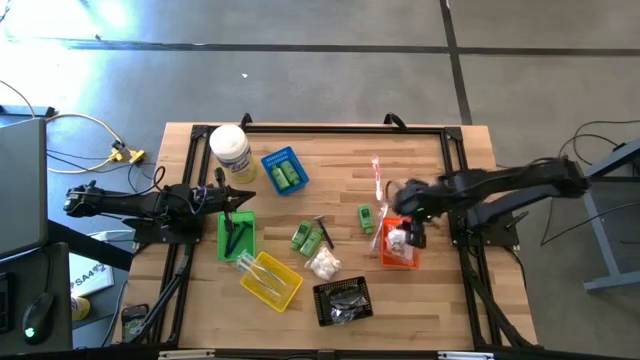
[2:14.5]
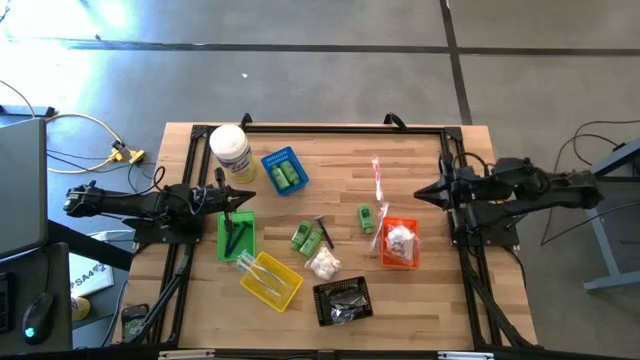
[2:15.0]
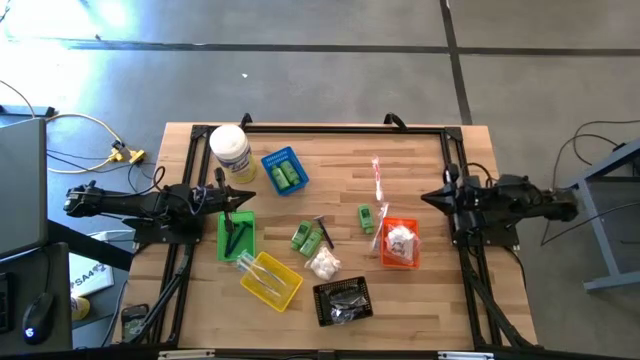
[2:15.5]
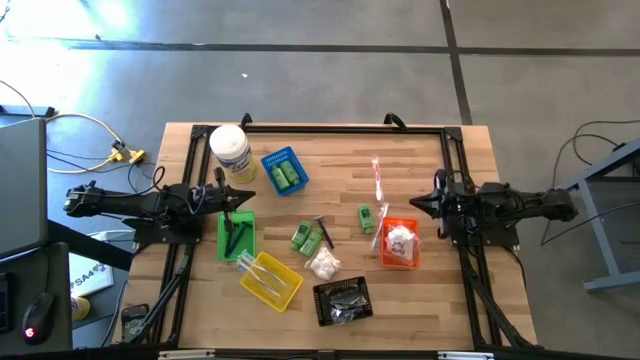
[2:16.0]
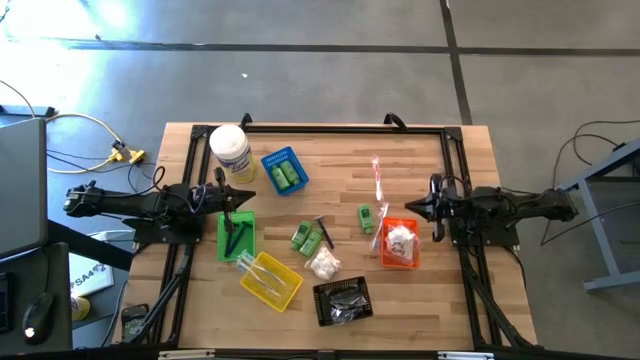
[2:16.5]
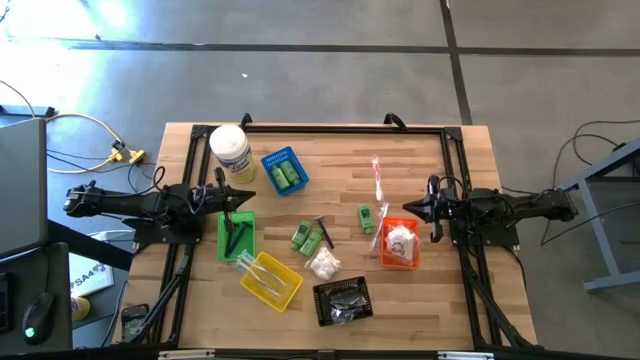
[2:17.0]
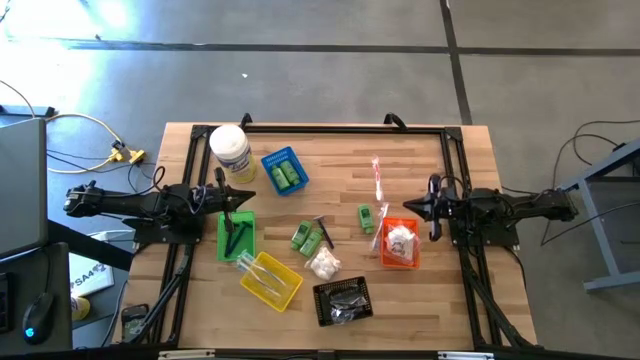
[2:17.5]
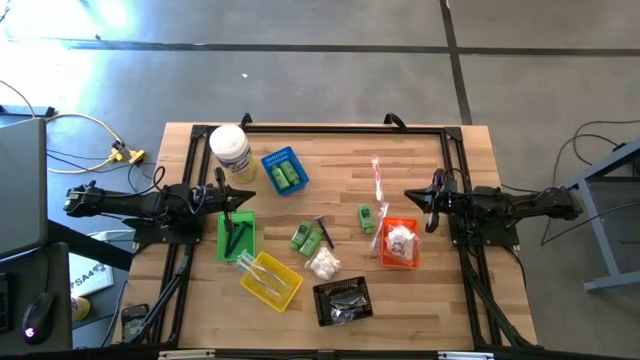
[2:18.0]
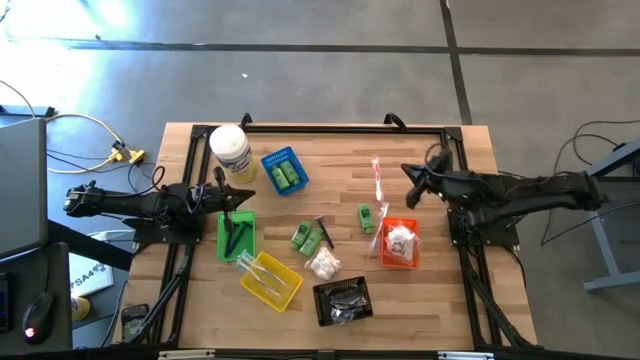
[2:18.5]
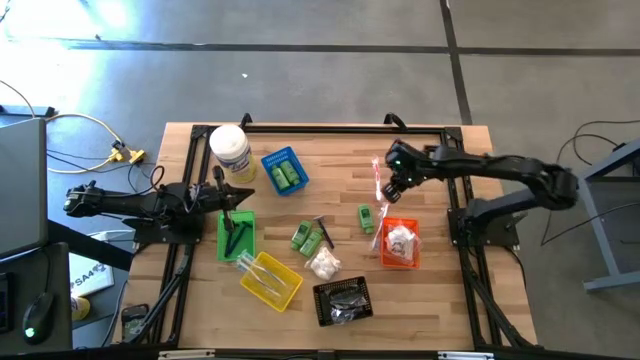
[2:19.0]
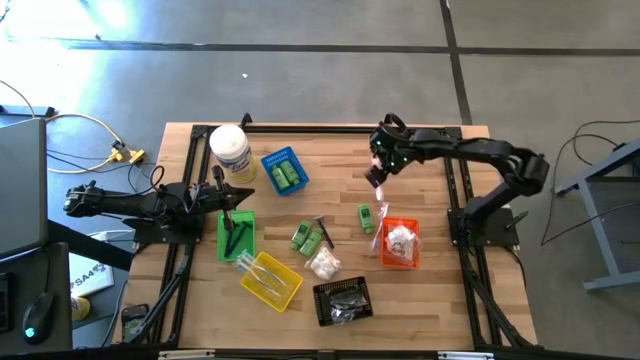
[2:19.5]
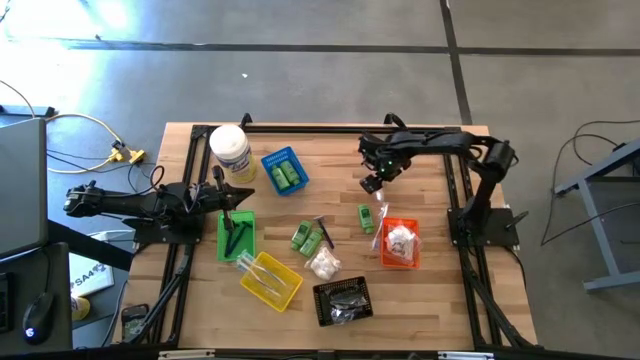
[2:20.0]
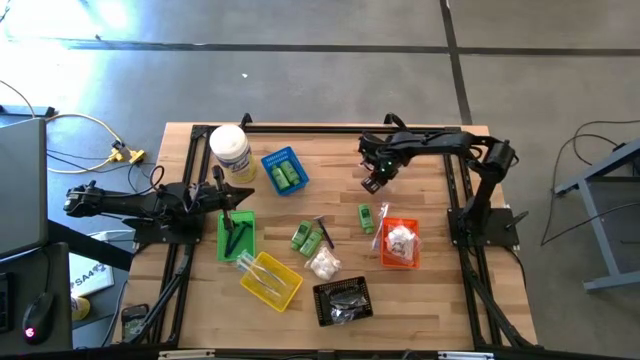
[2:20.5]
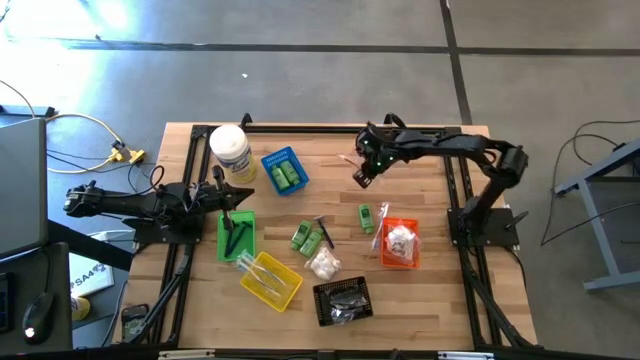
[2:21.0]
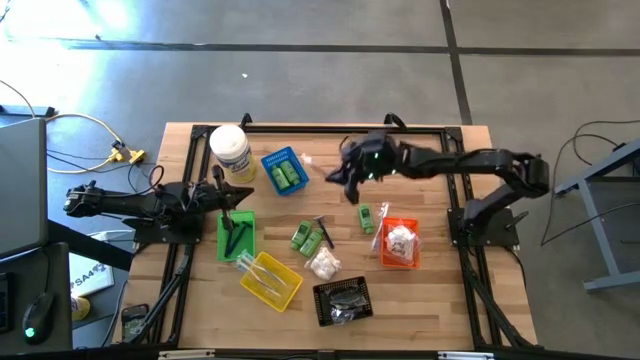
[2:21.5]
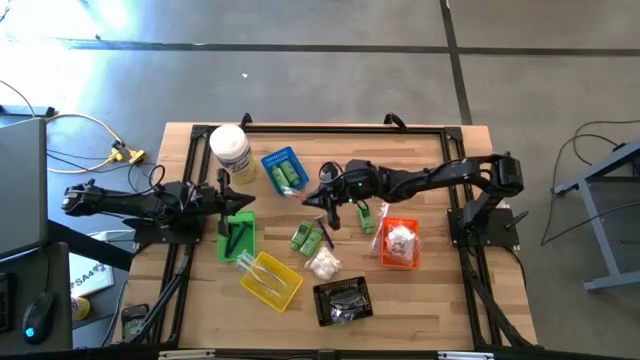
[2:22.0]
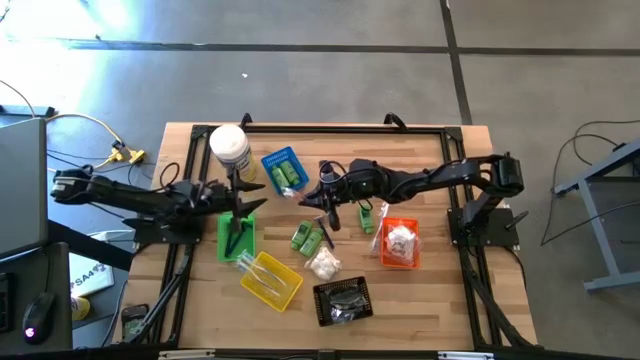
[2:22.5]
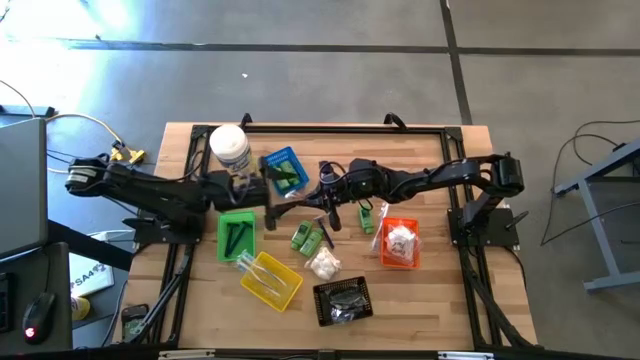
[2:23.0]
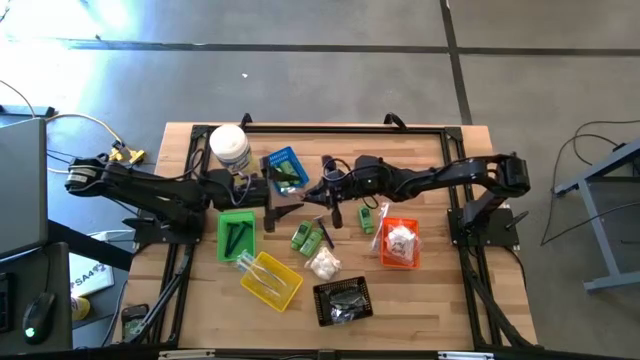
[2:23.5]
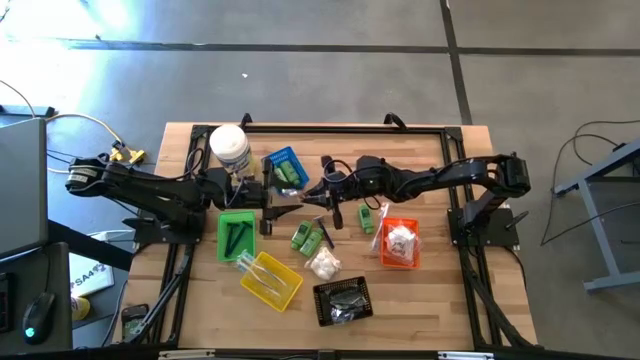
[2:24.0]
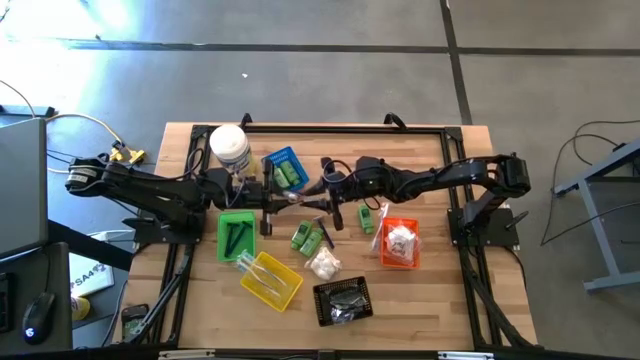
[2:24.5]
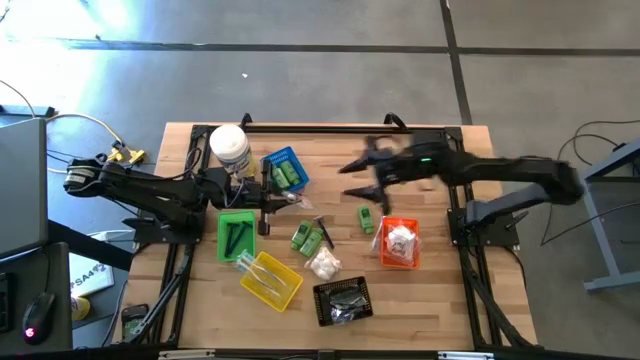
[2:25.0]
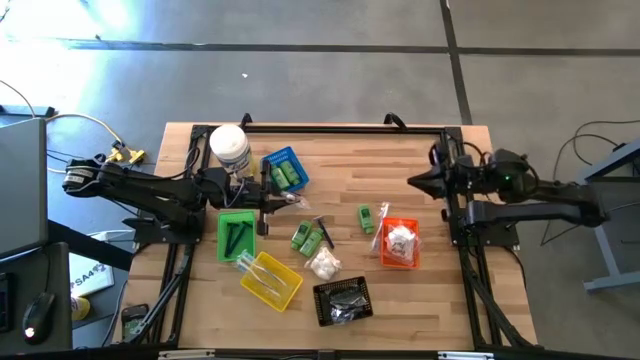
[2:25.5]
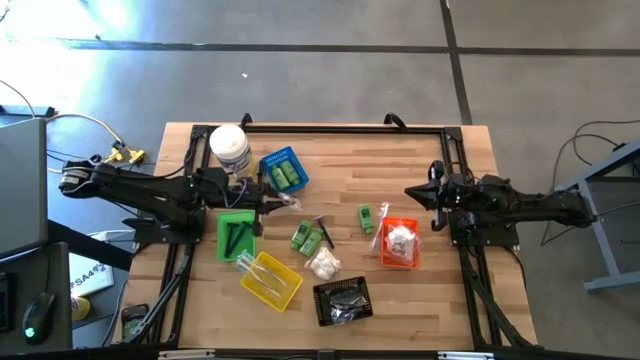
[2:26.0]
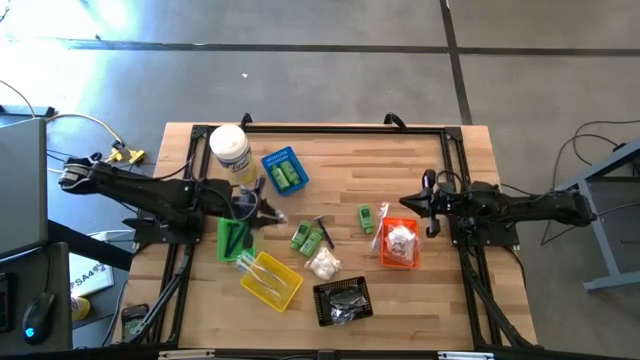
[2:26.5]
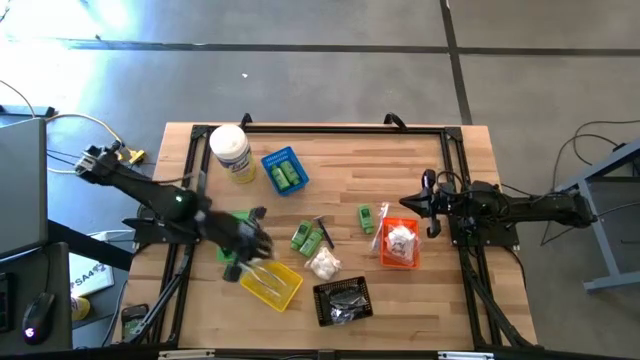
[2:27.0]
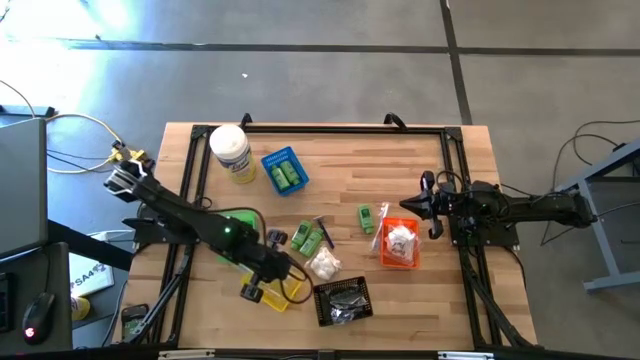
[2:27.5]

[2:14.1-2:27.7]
Task: Pick & Place Travel size toiletries
Put the orange toothbrush into the yellow bin

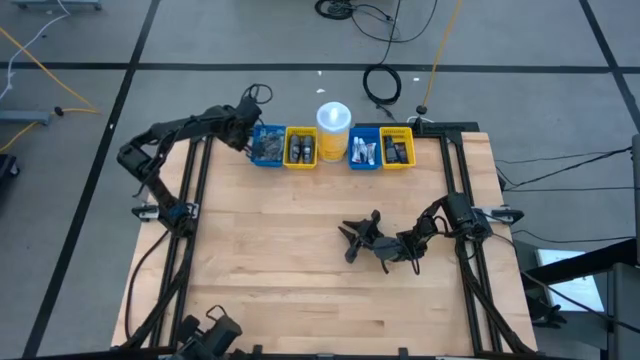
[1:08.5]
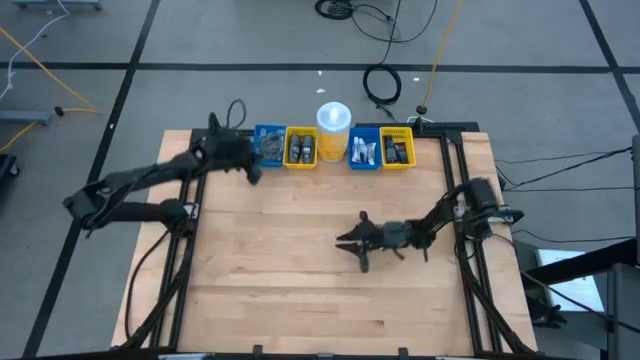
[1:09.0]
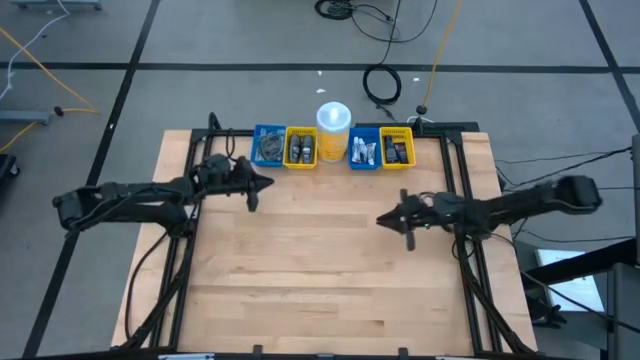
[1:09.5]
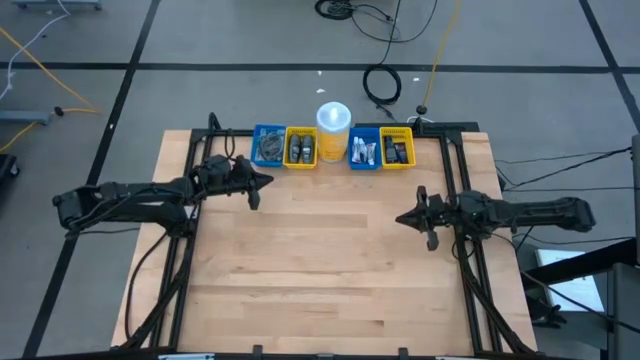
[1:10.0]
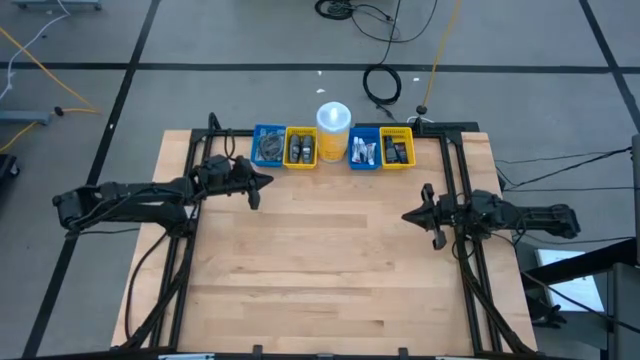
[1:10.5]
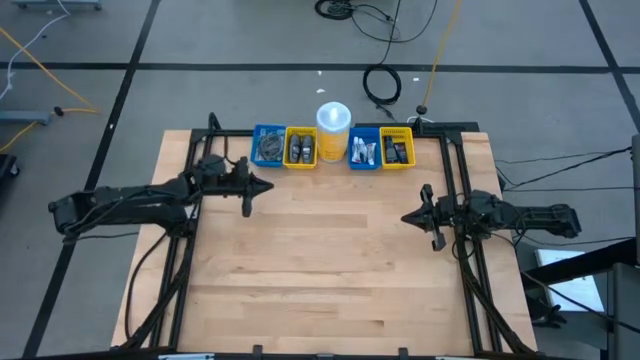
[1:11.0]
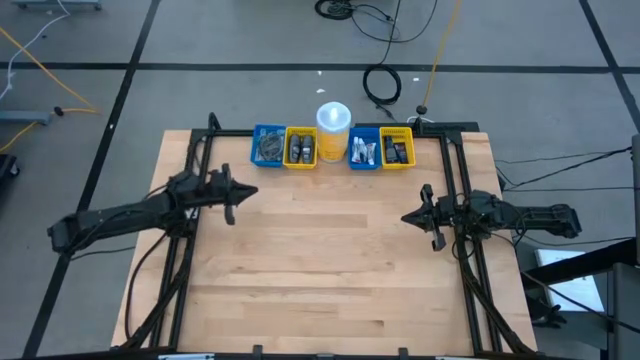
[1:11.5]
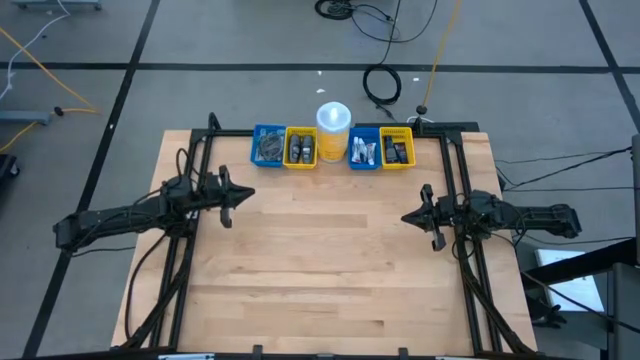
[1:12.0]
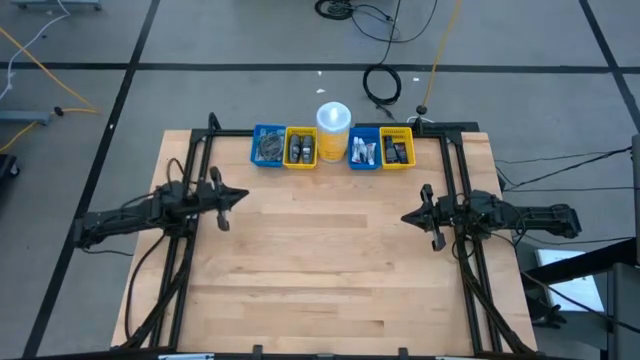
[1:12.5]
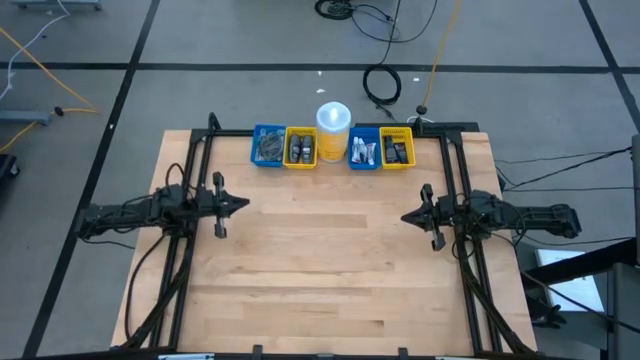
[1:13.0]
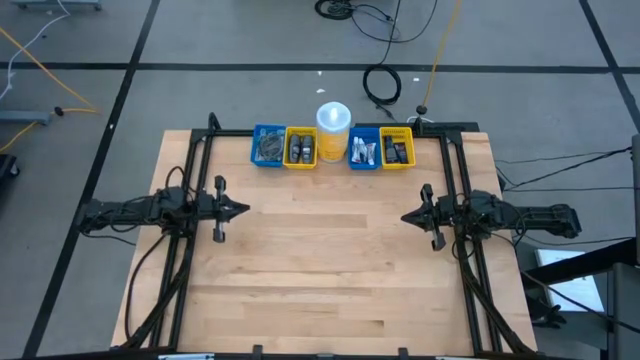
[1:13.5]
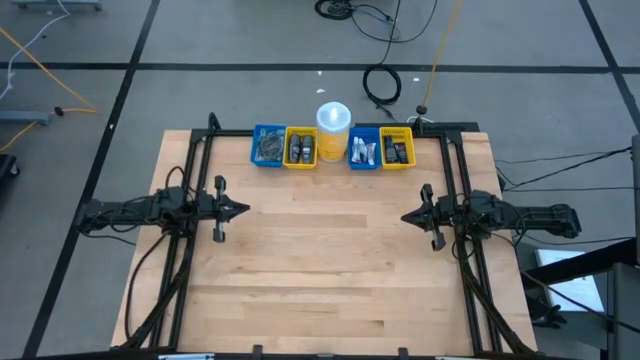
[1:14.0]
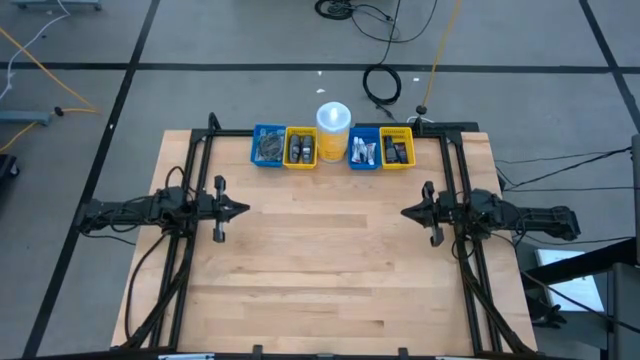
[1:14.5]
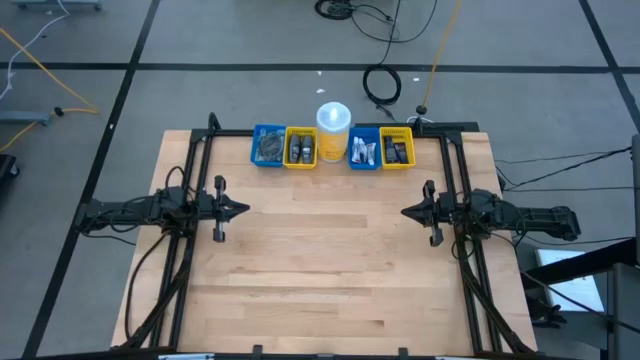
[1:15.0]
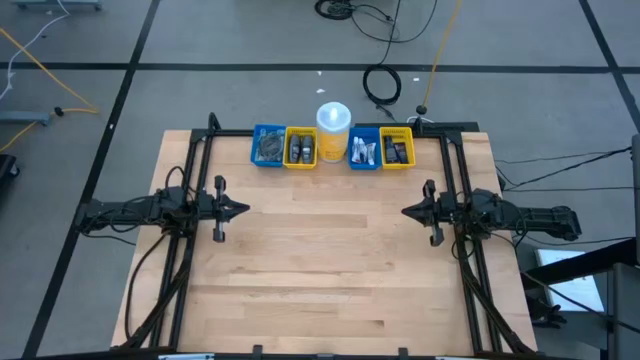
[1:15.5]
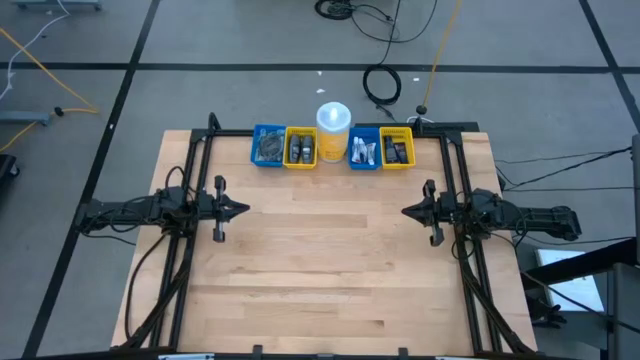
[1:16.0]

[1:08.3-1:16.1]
Task: Pick & Place Travel size toiletries
Return to Home Position
